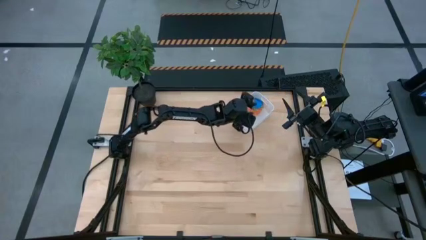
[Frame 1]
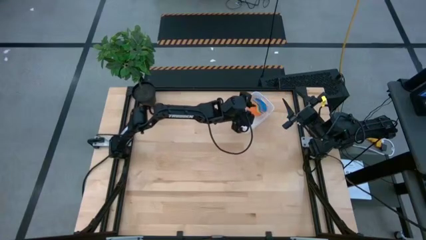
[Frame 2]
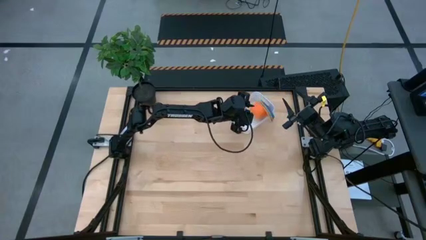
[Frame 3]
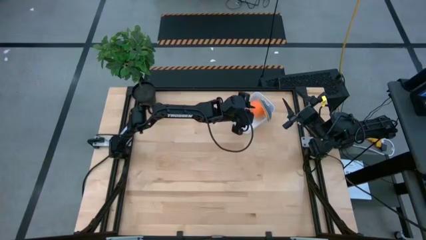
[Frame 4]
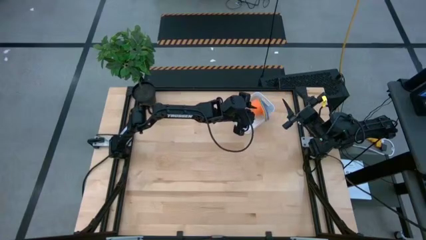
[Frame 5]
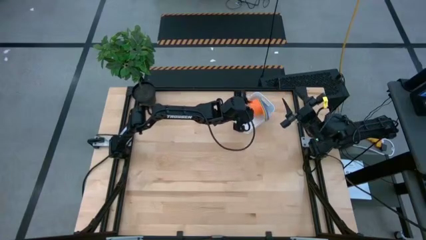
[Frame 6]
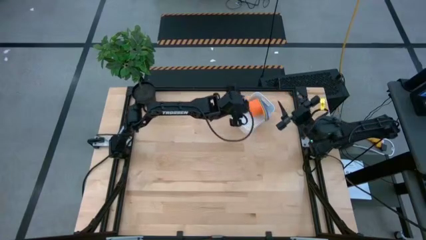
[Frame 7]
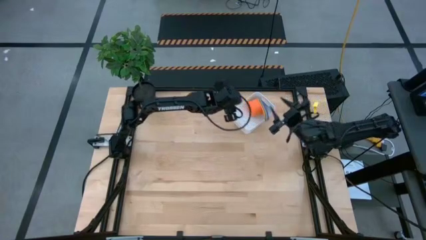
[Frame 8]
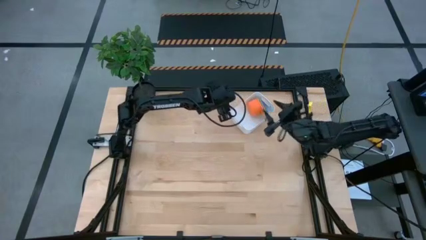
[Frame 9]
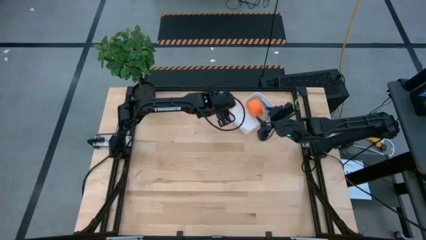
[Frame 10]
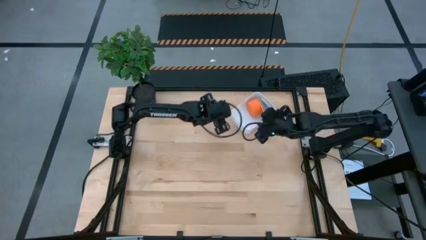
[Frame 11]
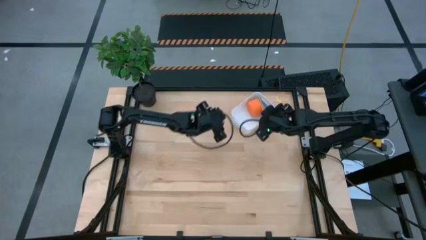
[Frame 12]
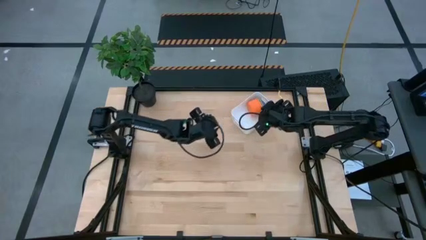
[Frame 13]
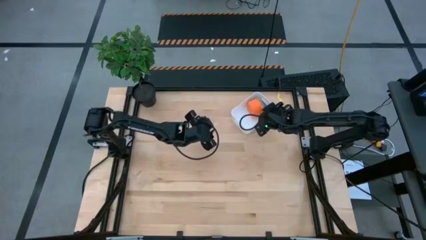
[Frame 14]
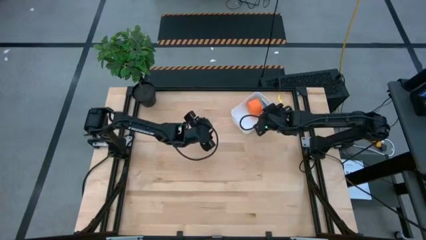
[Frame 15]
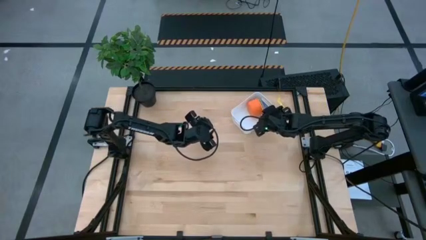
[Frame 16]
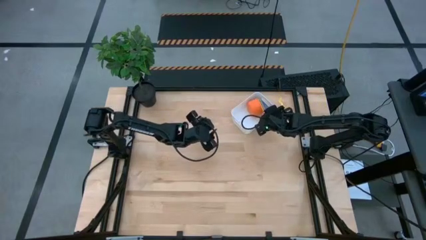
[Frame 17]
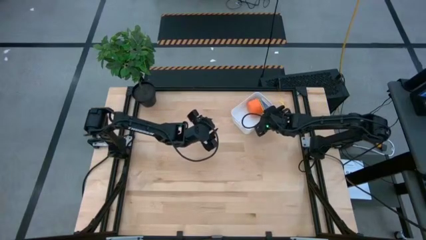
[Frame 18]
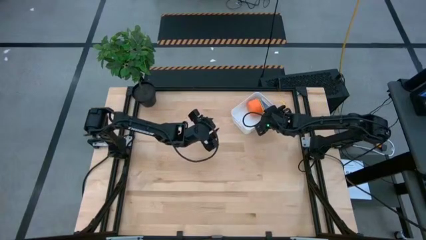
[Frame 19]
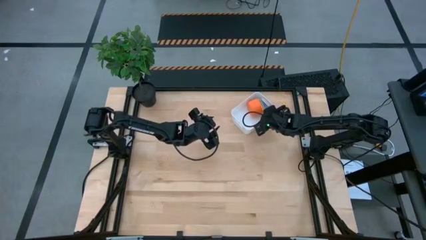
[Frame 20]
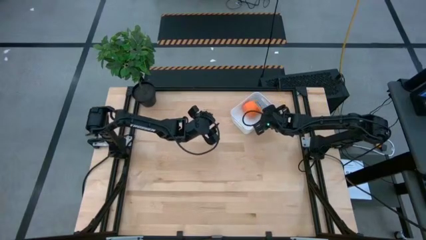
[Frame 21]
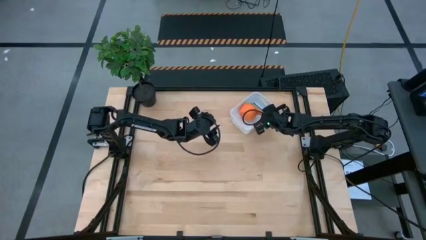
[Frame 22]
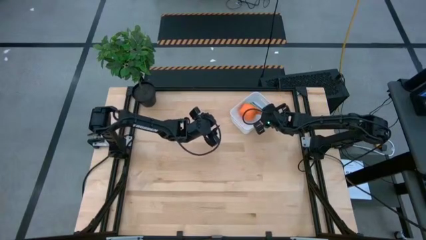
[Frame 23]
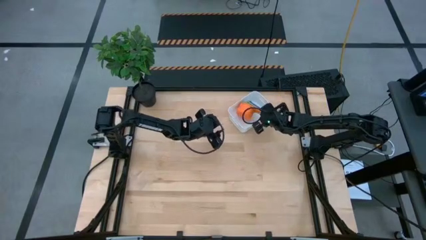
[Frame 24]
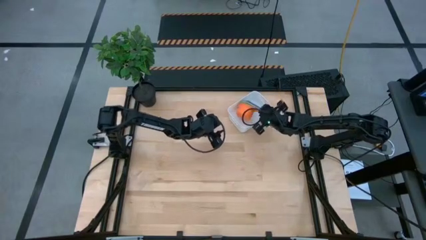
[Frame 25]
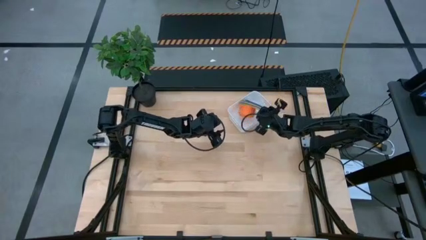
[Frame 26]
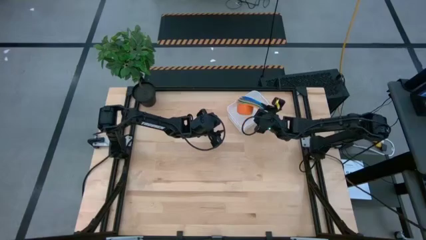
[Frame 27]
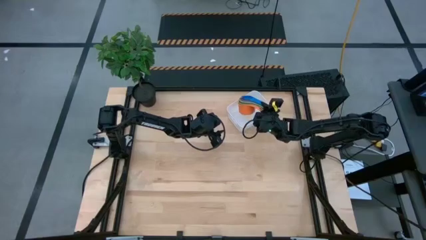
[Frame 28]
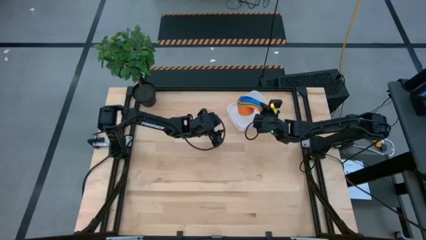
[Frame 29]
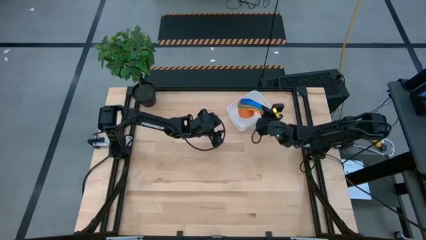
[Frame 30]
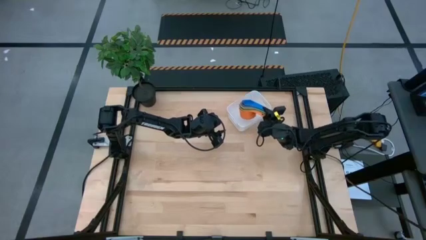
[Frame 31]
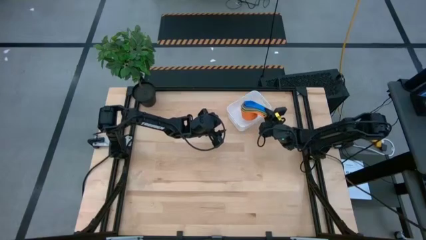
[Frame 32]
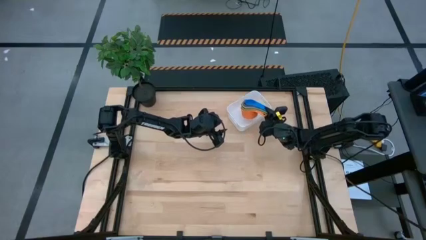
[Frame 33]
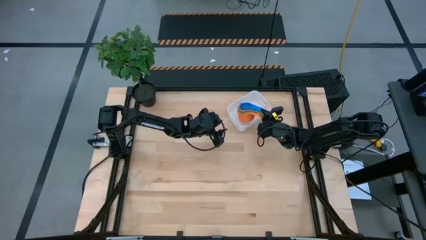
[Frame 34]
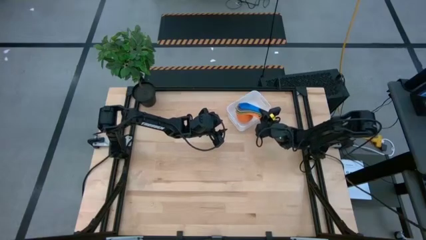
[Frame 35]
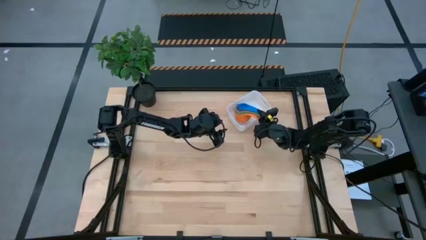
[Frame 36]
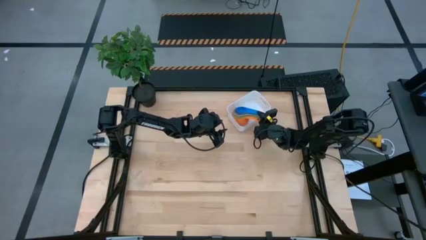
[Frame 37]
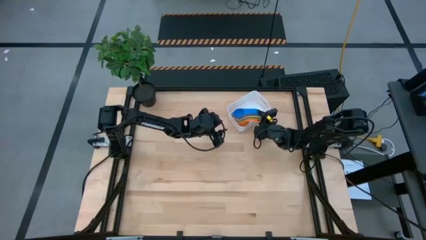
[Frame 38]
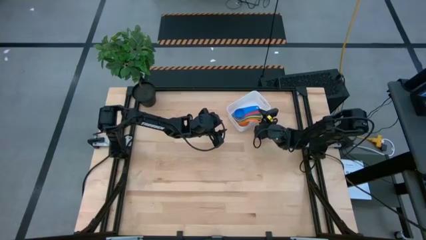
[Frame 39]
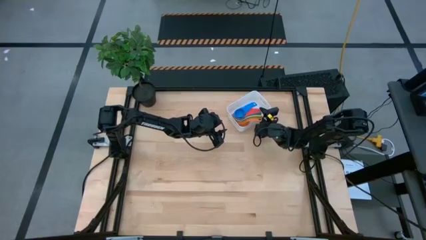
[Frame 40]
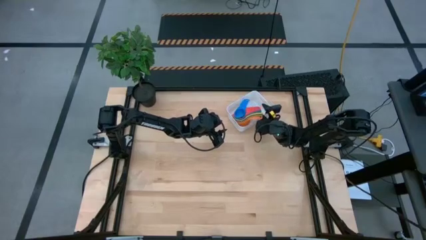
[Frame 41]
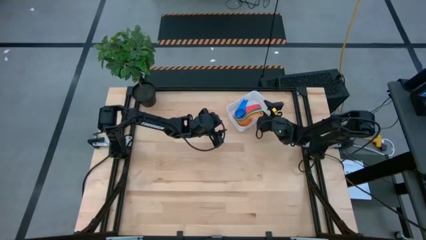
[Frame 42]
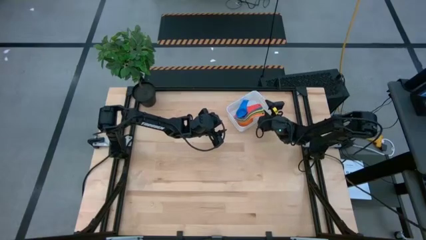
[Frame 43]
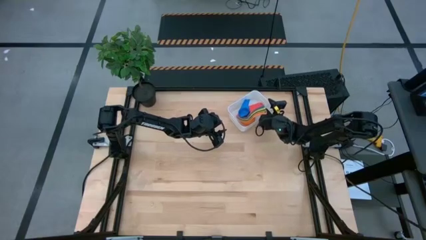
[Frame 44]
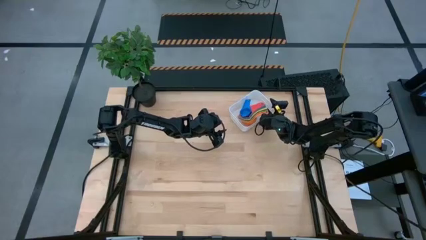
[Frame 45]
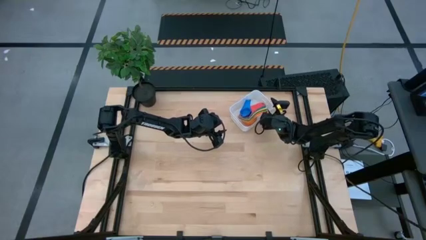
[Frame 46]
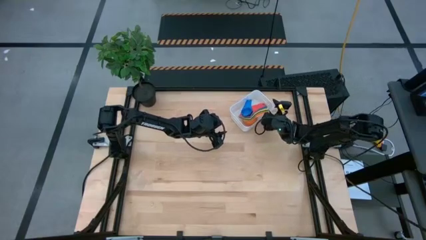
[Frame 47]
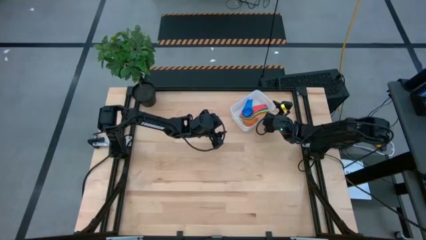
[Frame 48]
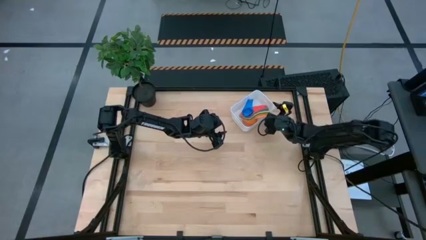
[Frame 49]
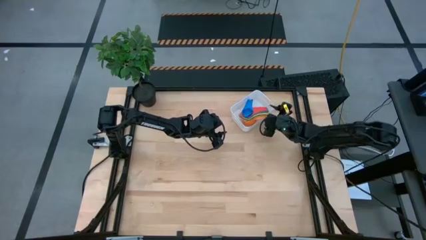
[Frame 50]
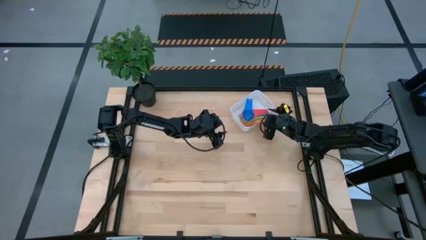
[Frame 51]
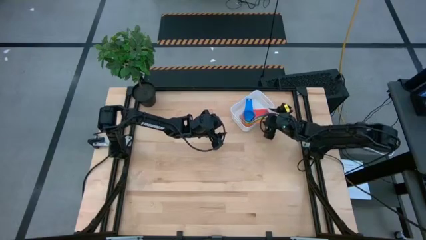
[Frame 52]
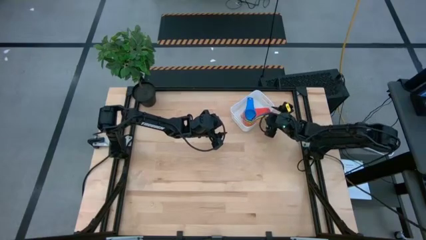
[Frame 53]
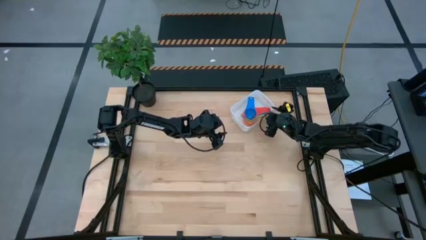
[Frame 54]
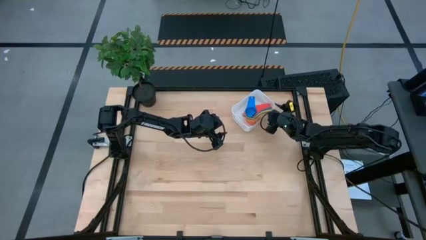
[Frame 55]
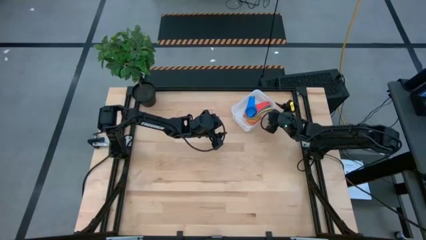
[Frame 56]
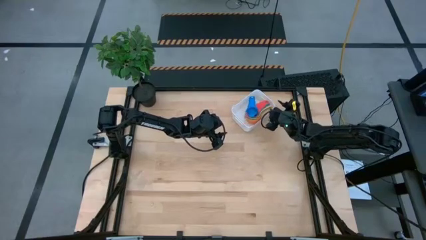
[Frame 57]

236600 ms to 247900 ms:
Task: Nest measuring cups in basket
Adjust the stacked measuring cups in the white bin

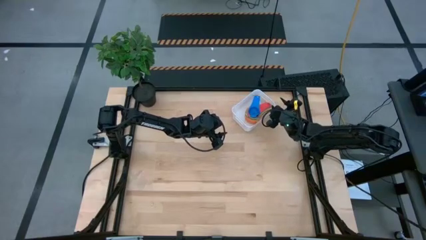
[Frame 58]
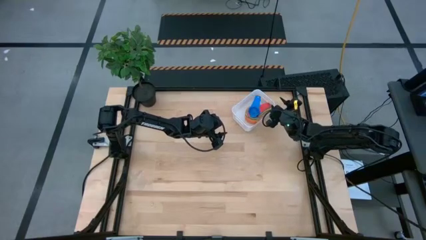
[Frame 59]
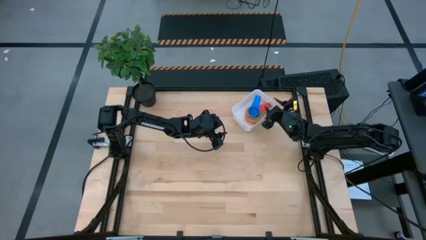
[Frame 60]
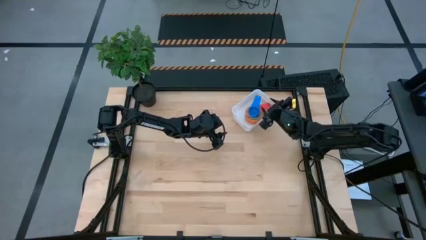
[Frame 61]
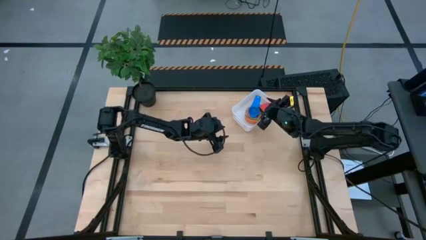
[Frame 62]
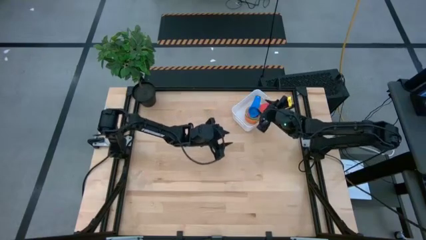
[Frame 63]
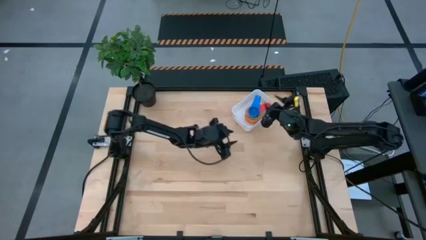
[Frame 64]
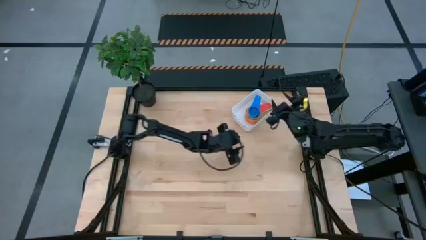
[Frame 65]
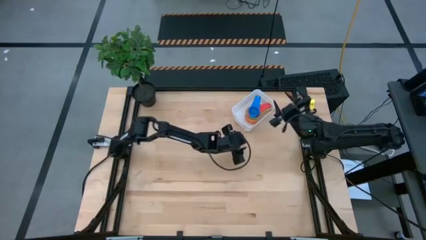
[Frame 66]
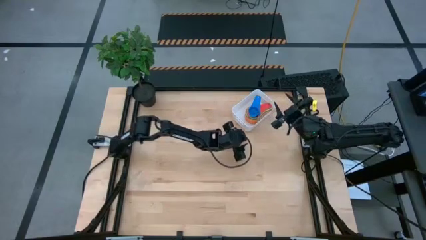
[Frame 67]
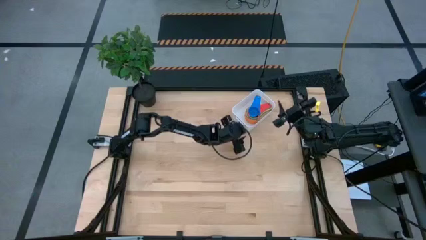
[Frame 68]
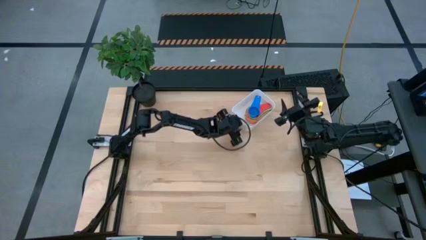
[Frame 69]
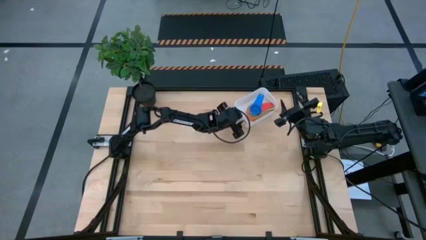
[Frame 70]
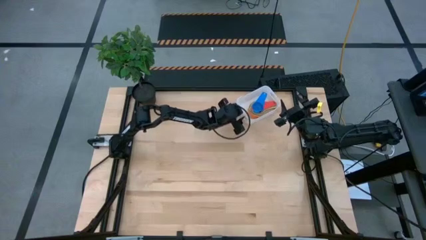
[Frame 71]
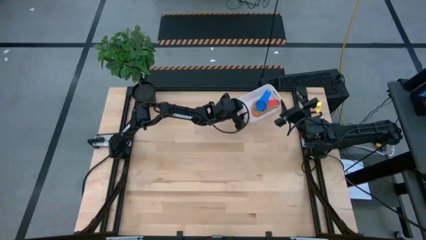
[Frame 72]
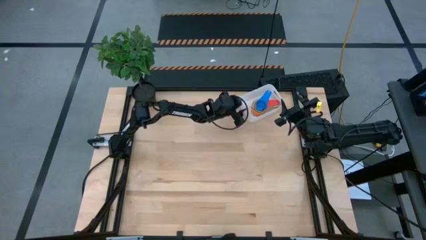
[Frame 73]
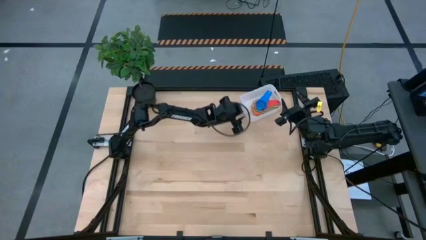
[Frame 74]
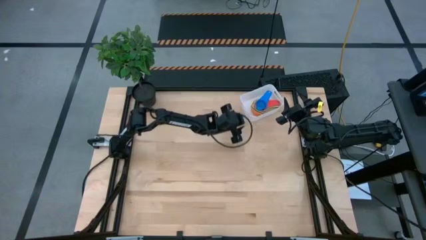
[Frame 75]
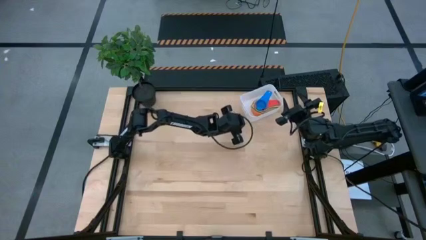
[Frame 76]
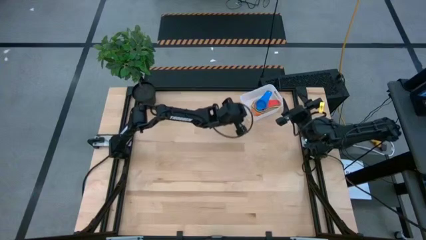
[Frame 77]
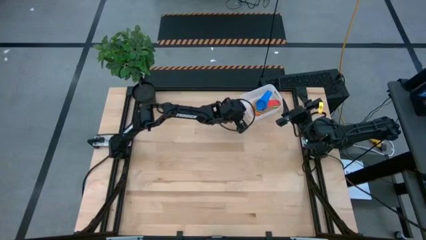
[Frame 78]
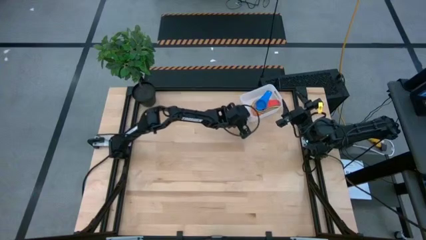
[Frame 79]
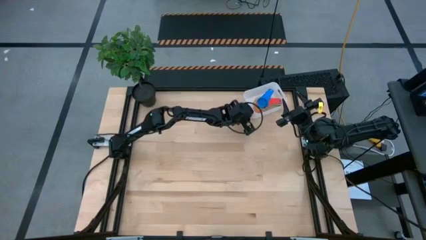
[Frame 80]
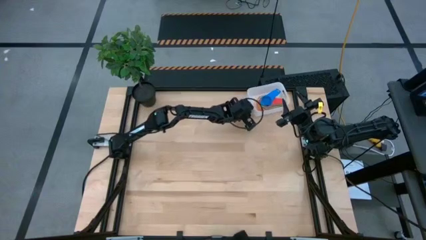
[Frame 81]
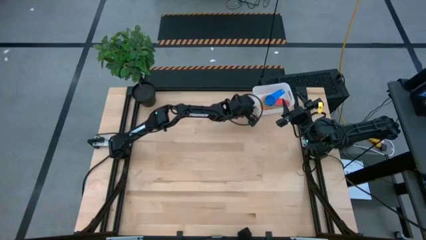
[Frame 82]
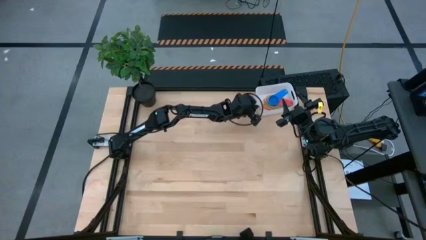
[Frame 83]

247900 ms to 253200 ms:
Move the white bin to the top right corner of the table
